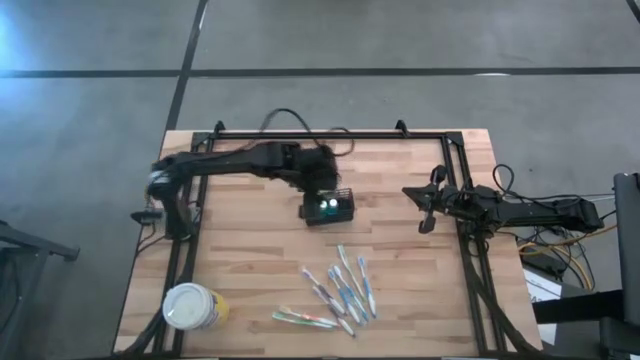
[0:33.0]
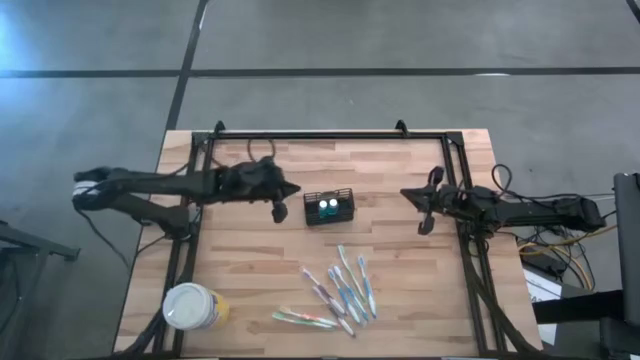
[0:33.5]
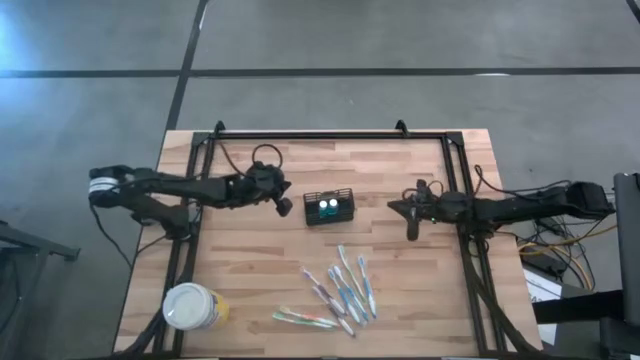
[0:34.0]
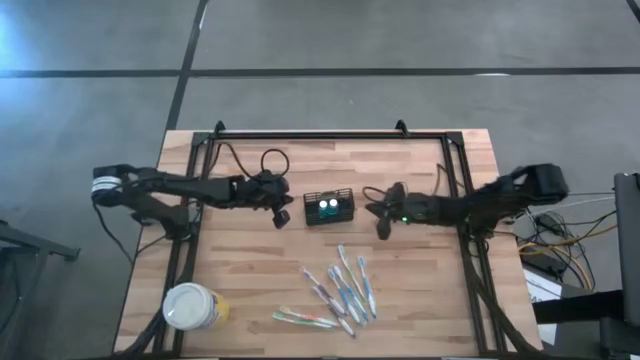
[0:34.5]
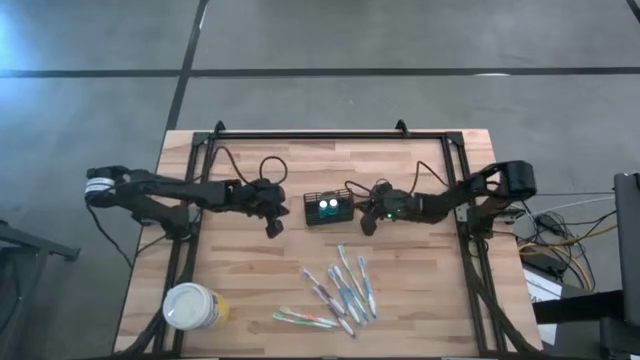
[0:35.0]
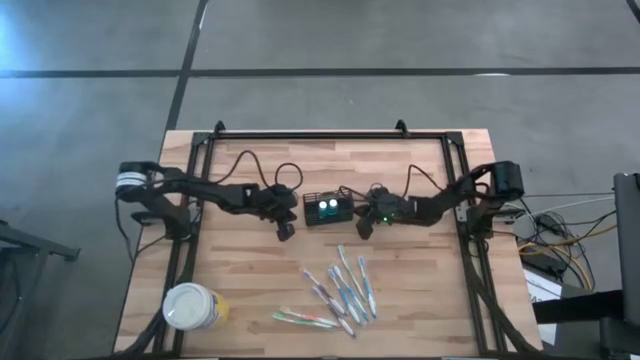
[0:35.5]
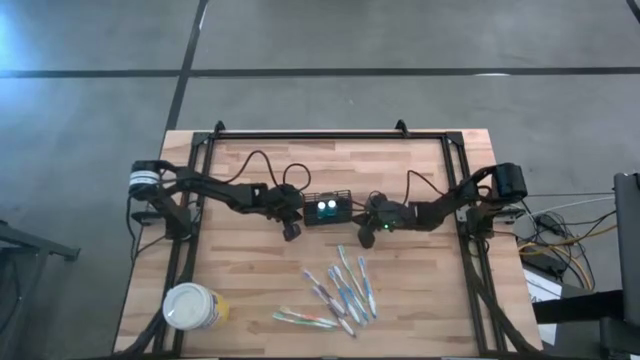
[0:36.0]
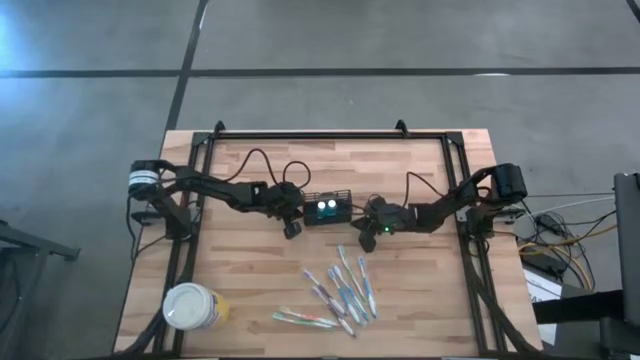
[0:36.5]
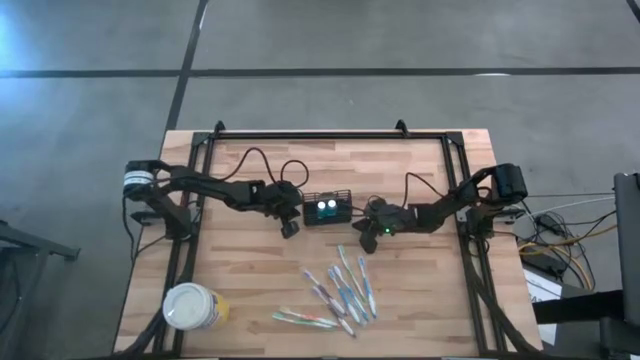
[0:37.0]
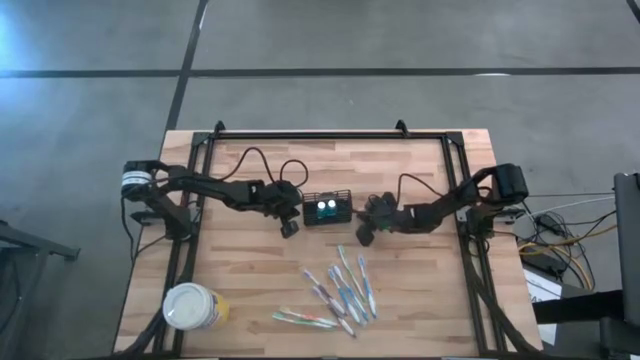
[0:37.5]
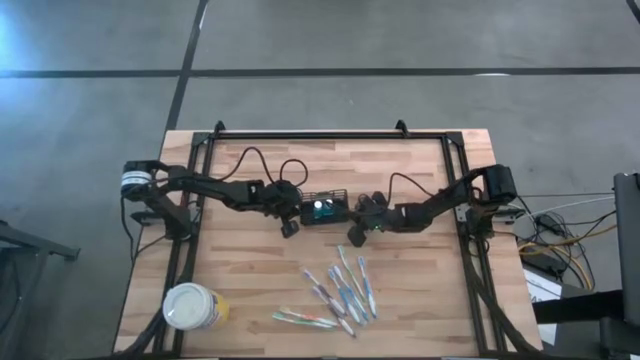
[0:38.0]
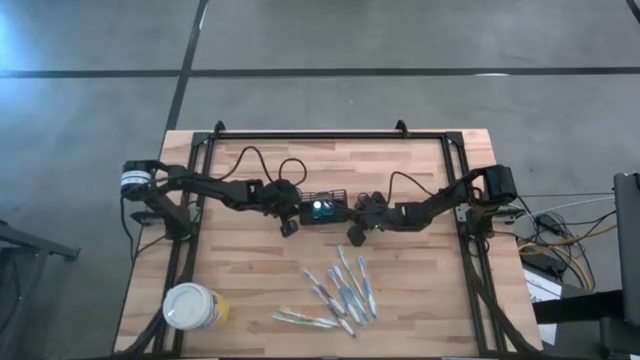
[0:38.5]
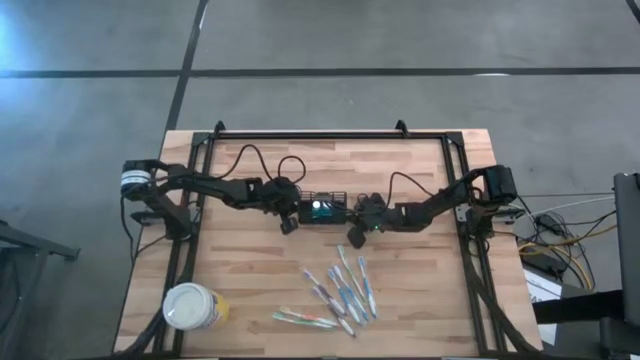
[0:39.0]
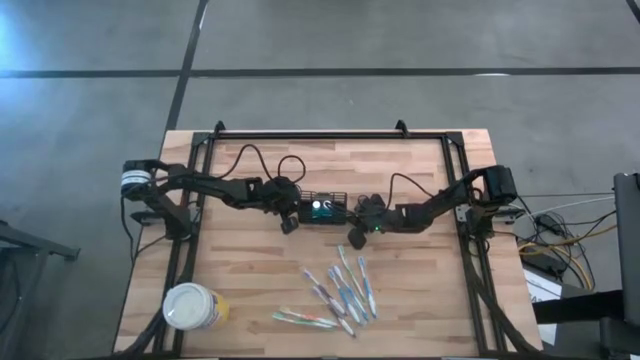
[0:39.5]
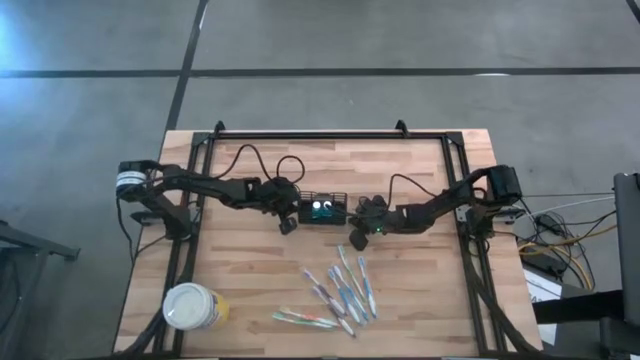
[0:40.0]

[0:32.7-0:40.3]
Task: Pick & Place toothbrushing station
Adjust the wire organizer

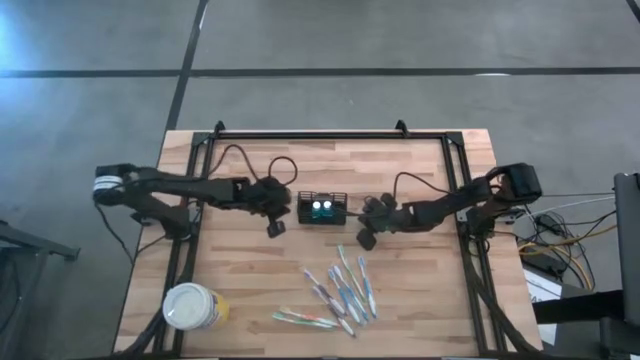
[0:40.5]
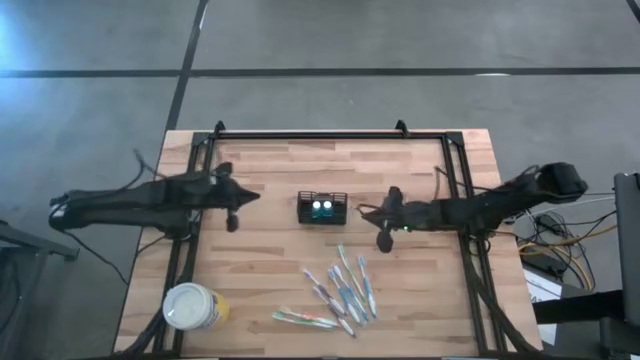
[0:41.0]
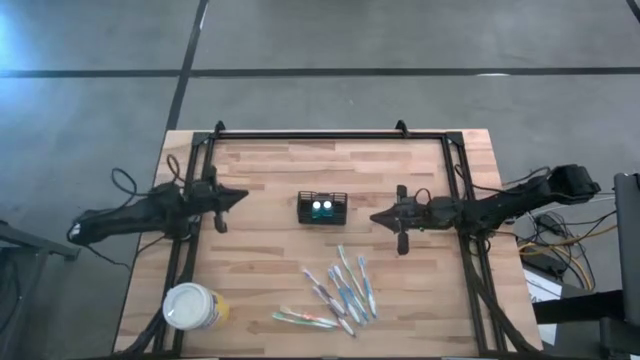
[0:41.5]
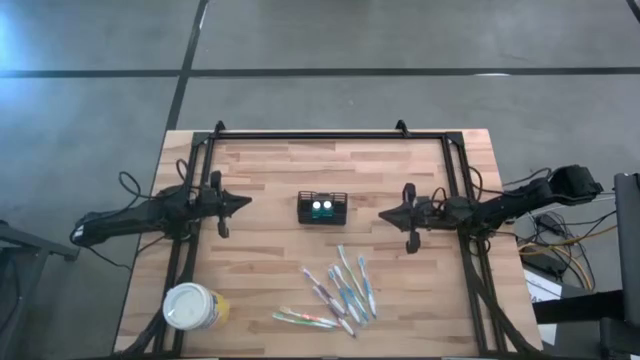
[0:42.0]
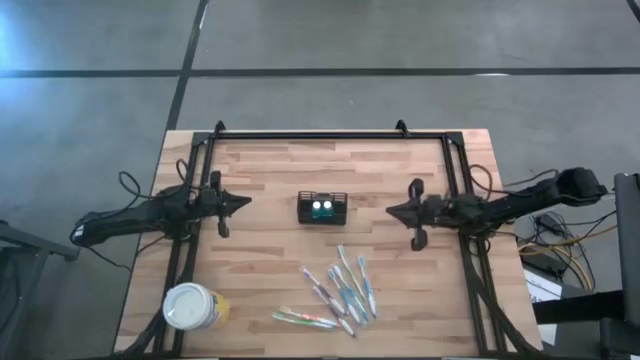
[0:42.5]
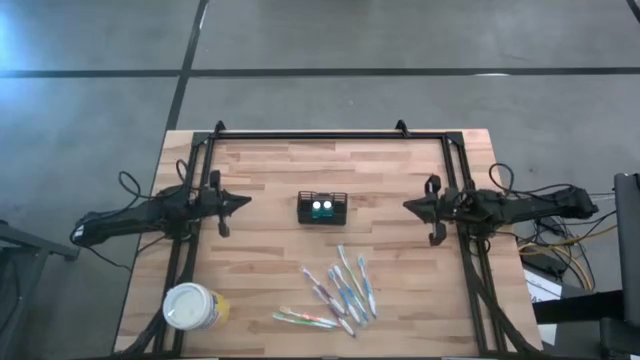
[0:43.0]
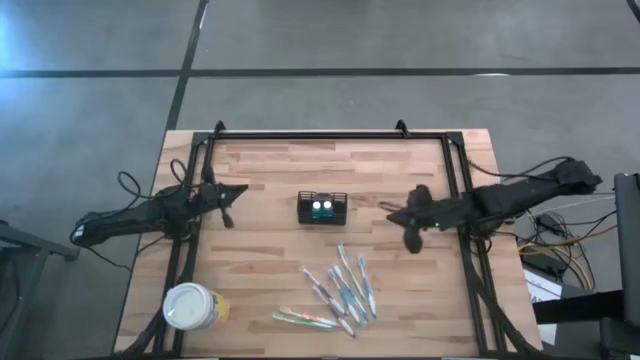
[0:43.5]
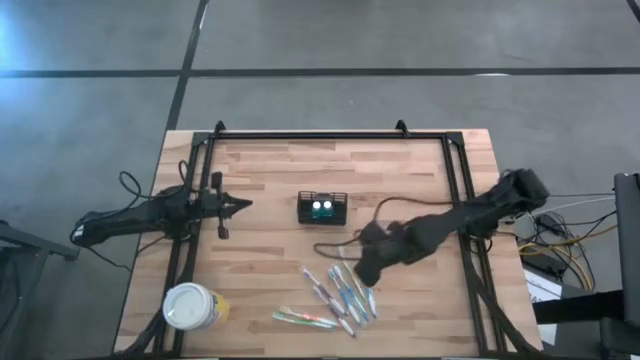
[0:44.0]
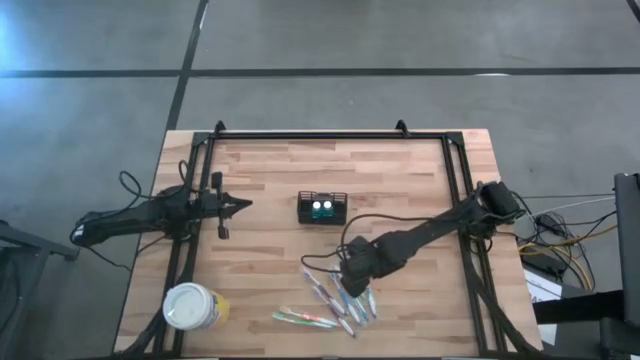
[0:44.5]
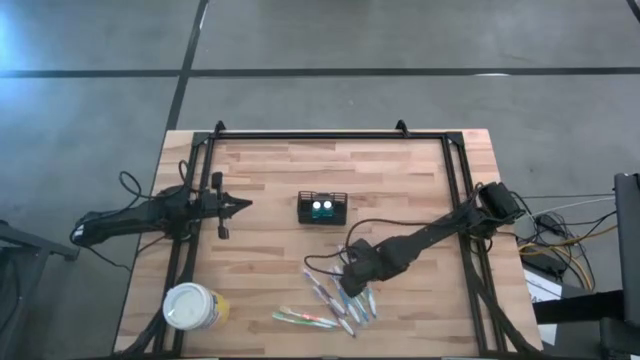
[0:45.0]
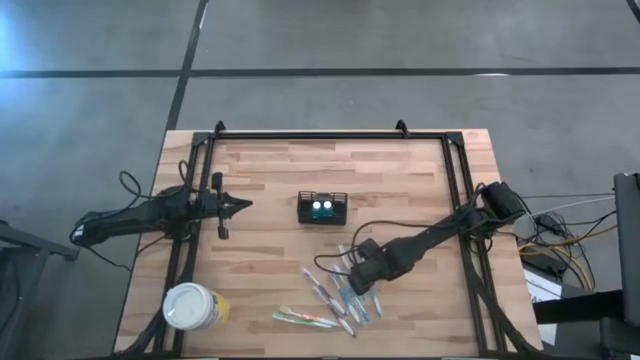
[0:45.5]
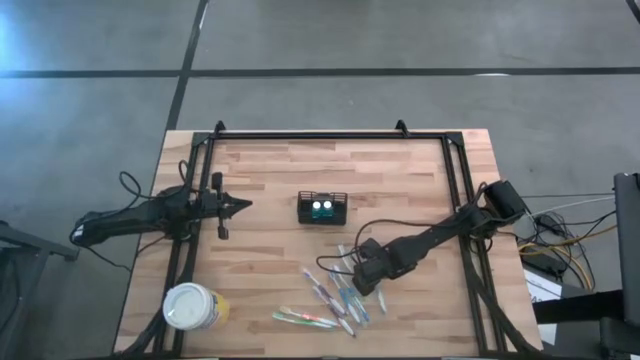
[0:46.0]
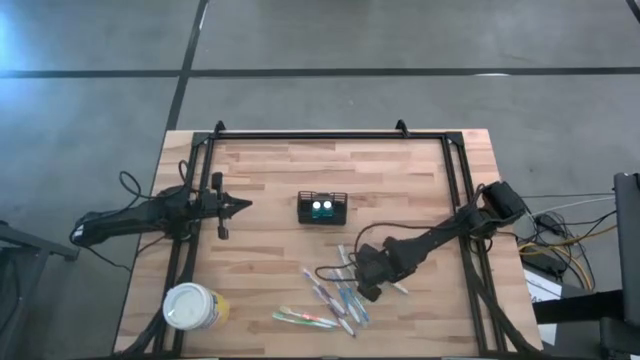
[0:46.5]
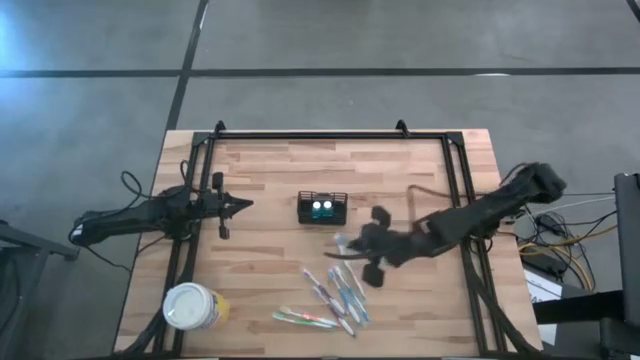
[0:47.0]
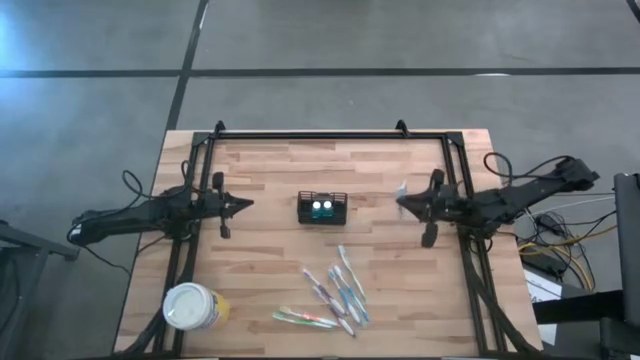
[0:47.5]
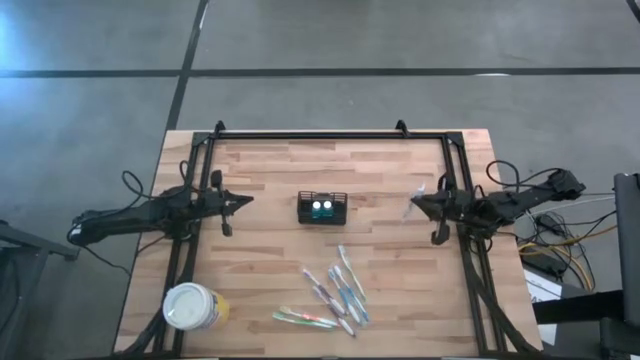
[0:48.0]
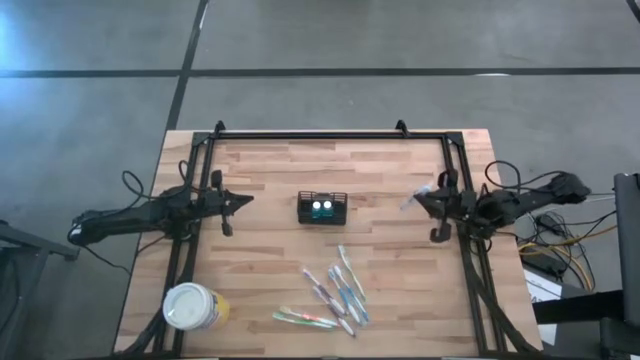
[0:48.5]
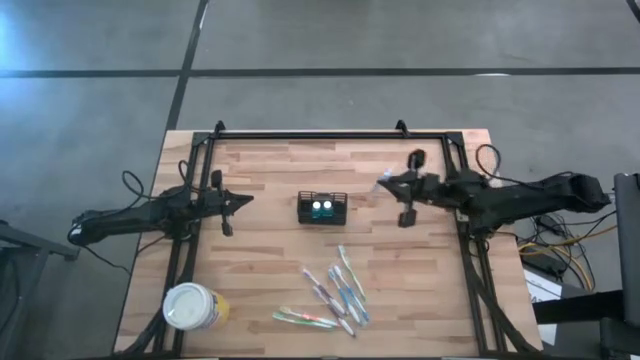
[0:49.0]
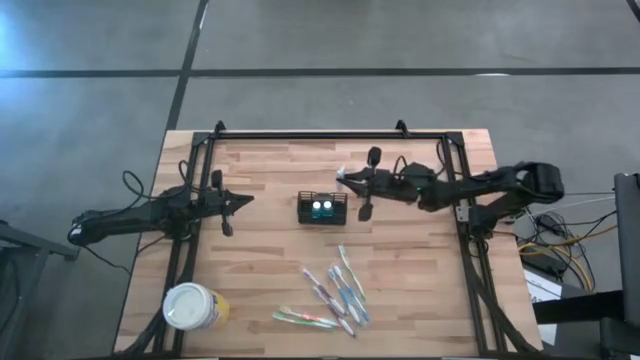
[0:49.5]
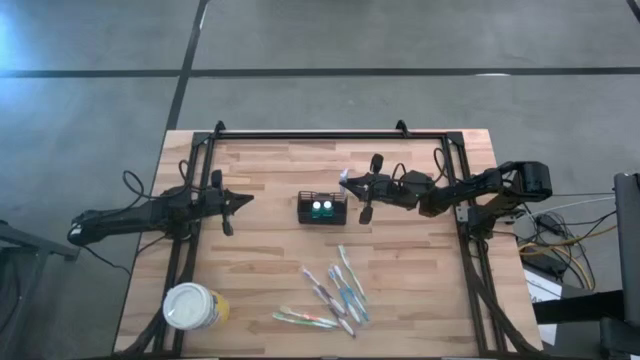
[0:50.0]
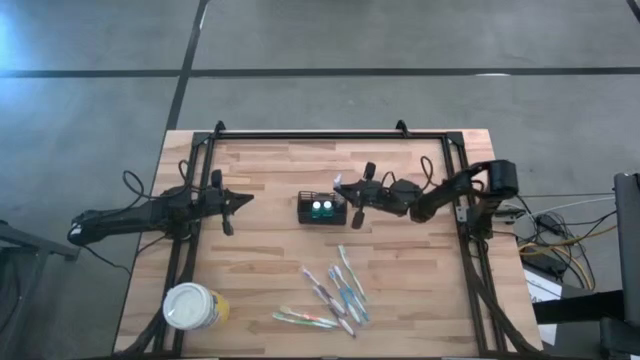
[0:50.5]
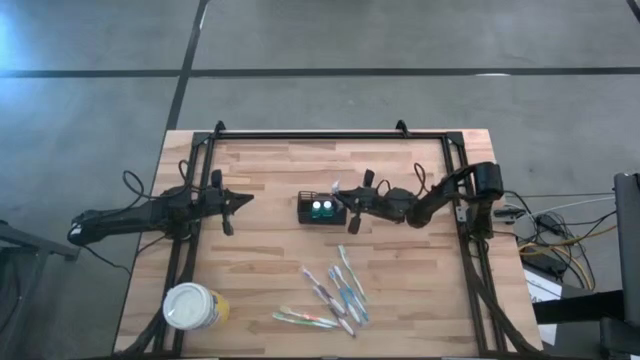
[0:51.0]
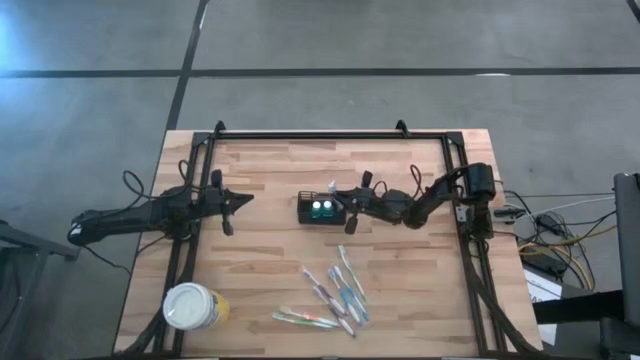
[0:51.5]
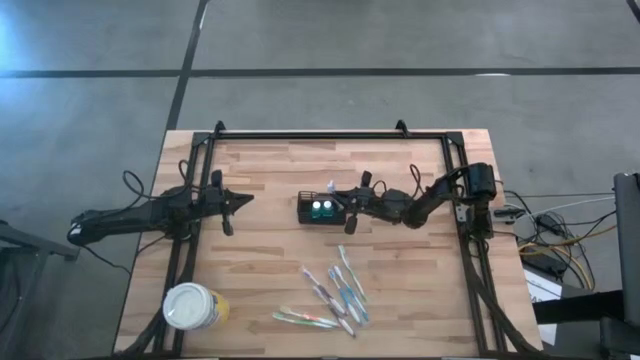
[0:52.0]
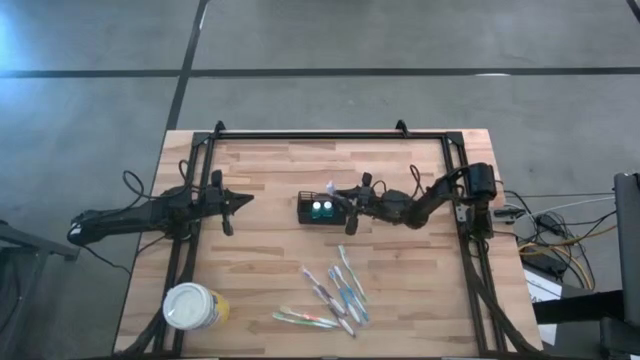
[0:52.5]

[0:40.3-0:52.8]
Put the blue toothbrush into the wire organizer

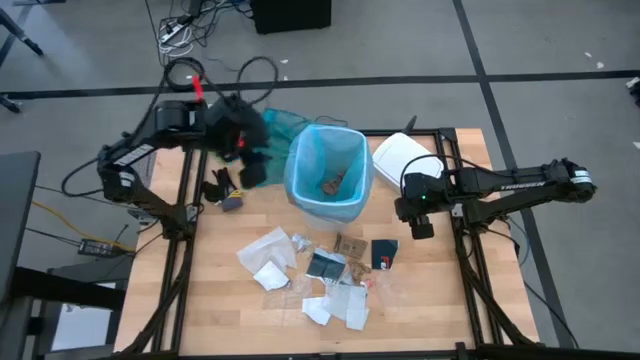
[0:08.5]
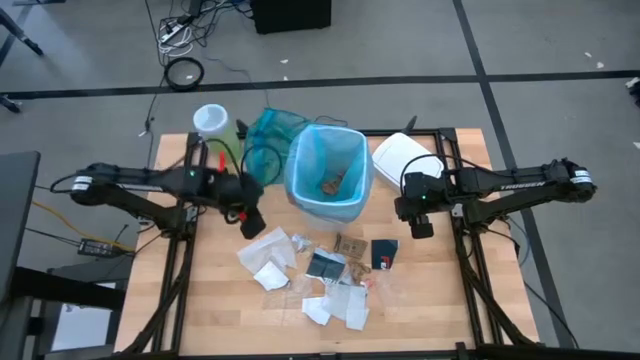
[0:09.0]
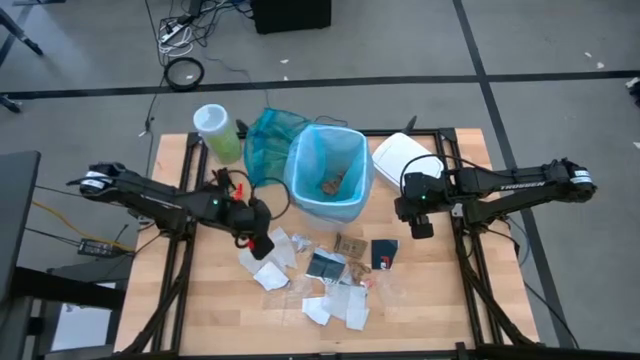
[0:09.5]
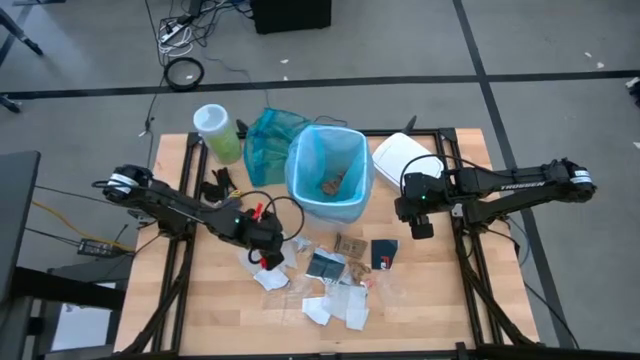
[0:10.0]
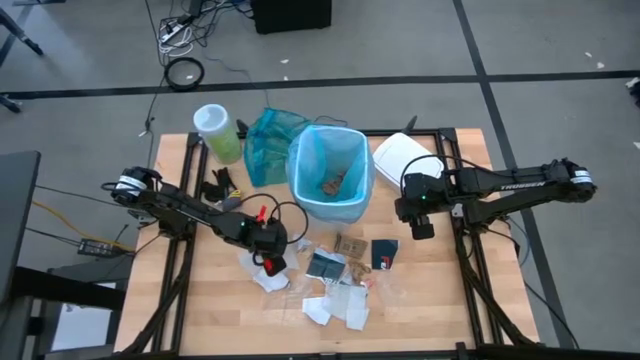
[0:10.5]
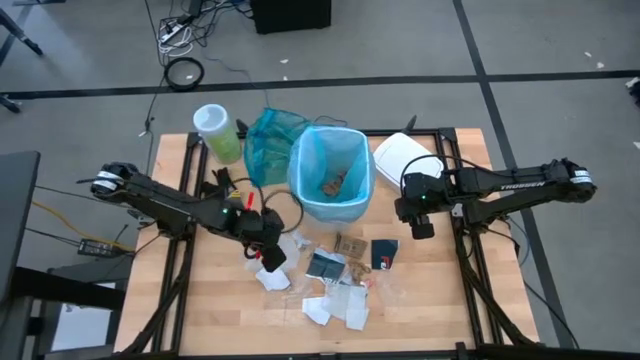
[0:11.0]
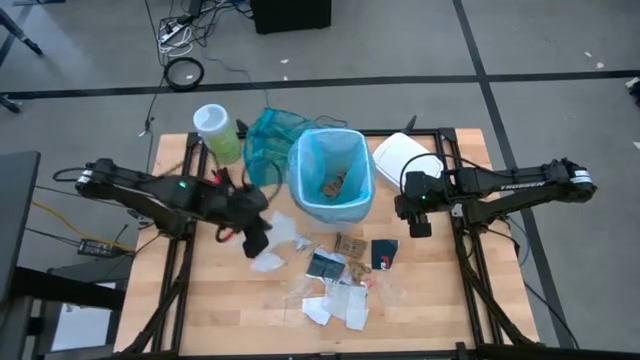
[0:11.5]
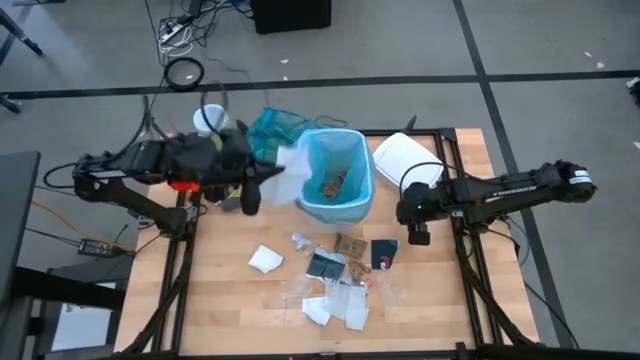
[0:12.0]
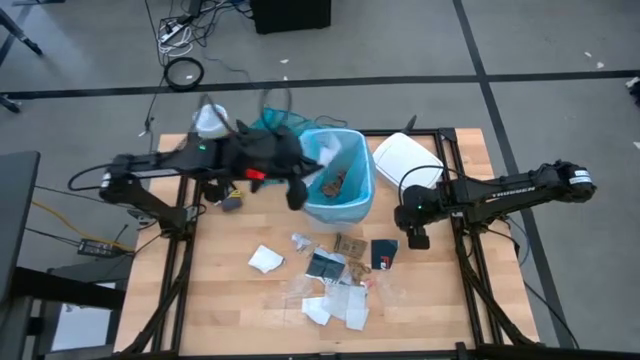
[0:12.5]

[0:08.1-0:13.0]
Task: place trash/remove bag and relplace
Put the white napkin into the white trash bin
